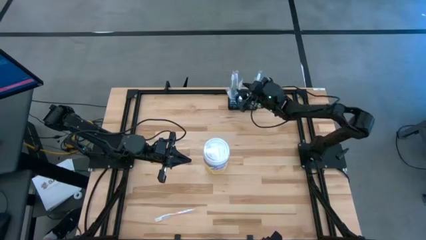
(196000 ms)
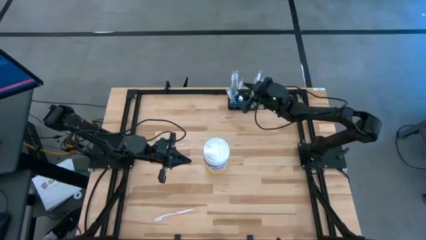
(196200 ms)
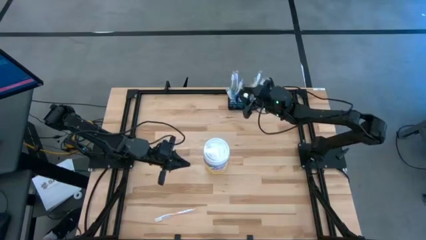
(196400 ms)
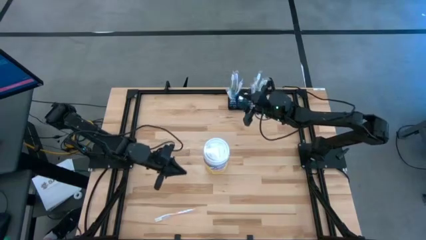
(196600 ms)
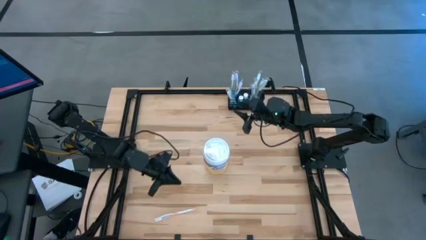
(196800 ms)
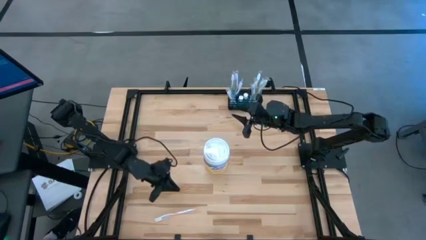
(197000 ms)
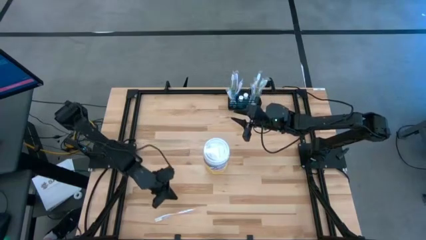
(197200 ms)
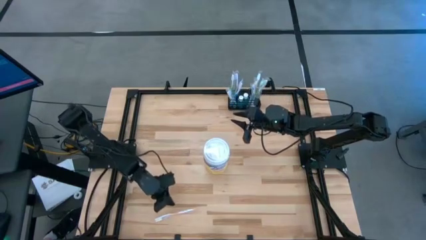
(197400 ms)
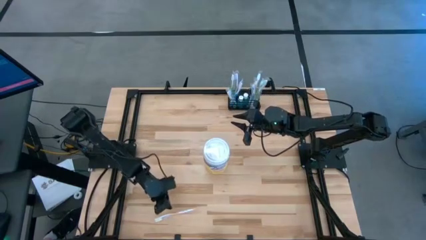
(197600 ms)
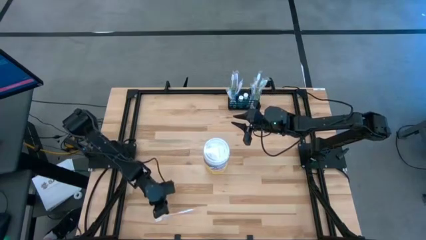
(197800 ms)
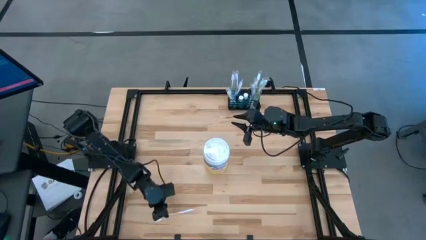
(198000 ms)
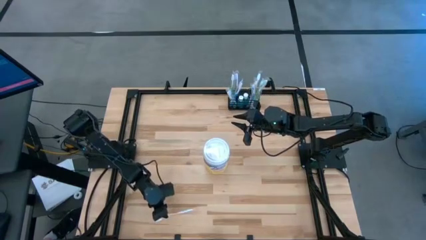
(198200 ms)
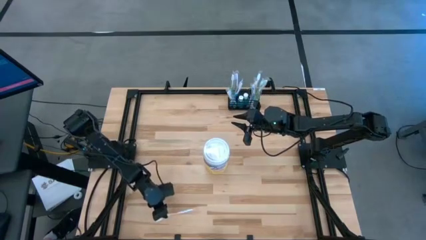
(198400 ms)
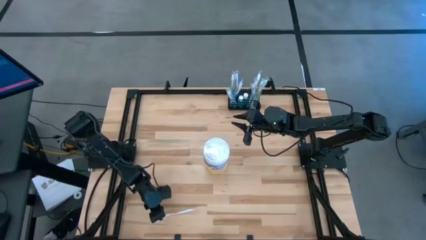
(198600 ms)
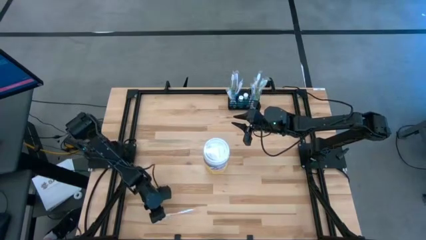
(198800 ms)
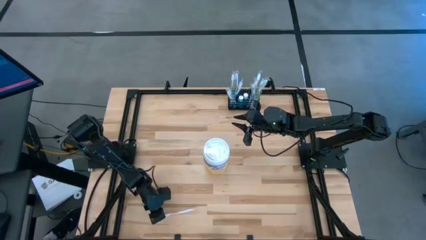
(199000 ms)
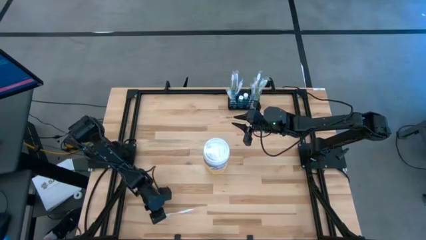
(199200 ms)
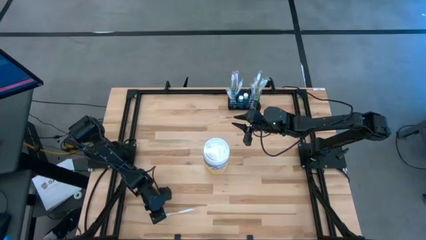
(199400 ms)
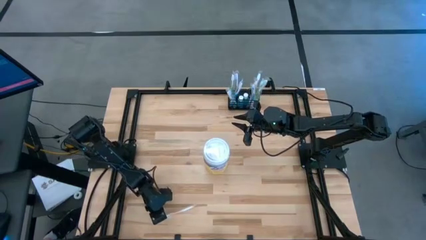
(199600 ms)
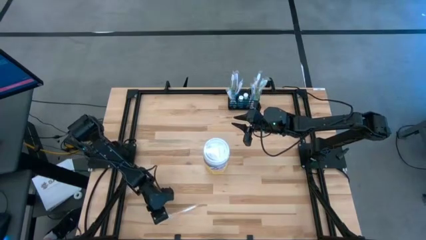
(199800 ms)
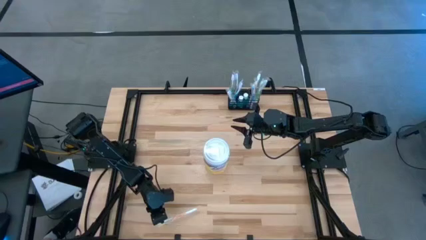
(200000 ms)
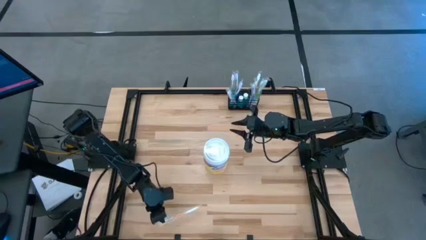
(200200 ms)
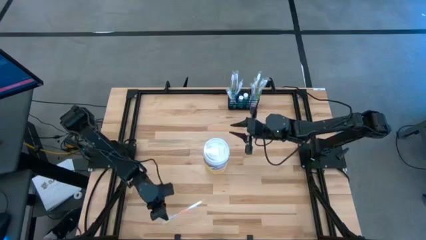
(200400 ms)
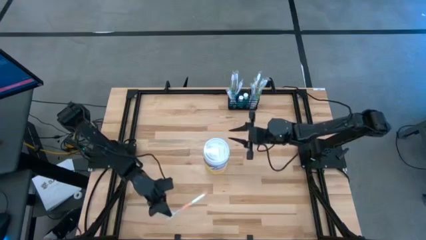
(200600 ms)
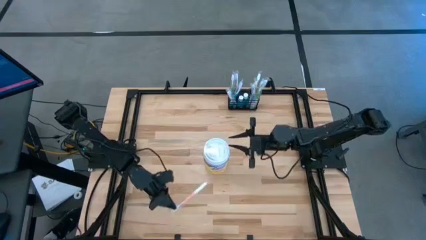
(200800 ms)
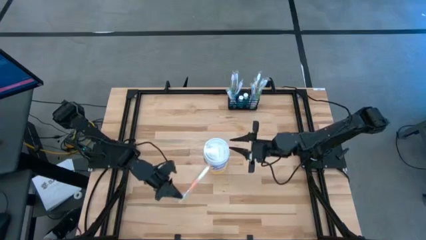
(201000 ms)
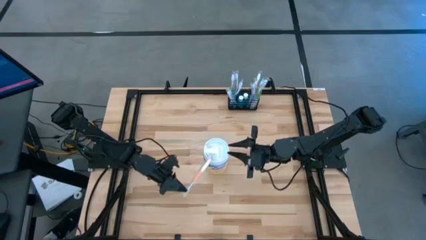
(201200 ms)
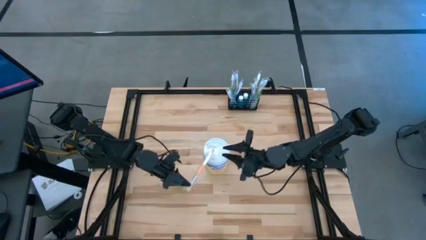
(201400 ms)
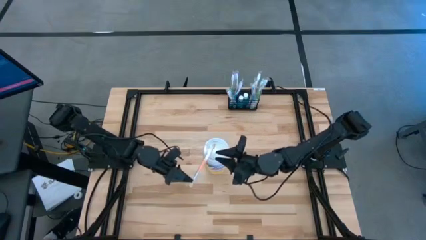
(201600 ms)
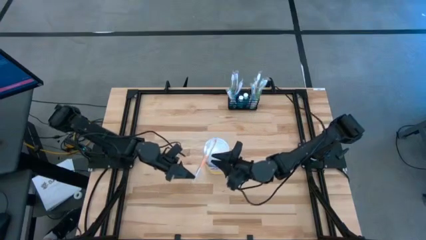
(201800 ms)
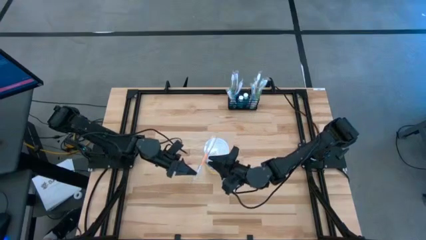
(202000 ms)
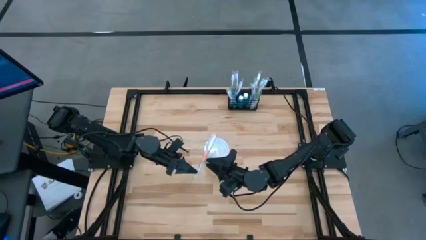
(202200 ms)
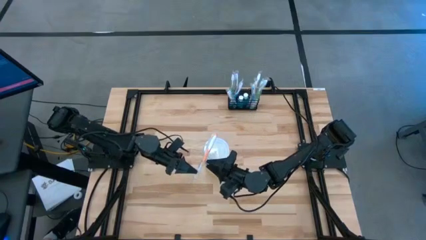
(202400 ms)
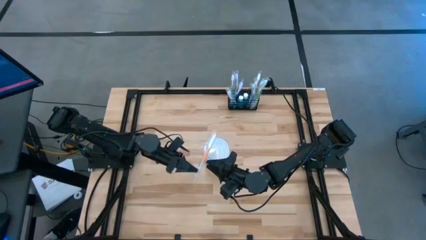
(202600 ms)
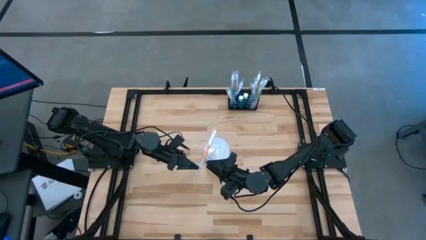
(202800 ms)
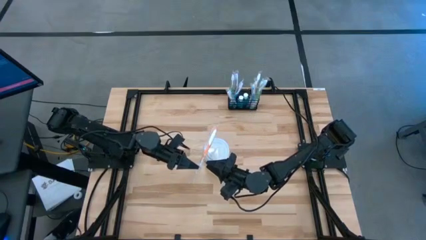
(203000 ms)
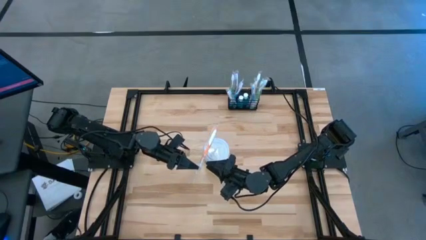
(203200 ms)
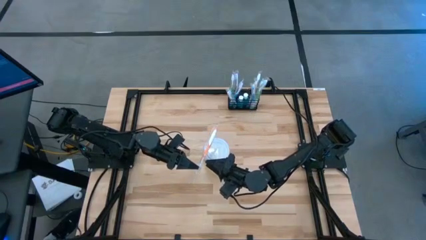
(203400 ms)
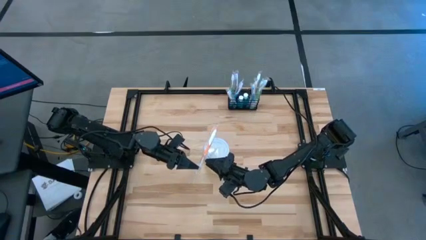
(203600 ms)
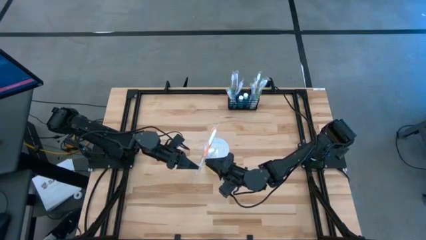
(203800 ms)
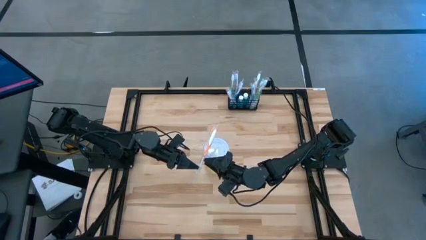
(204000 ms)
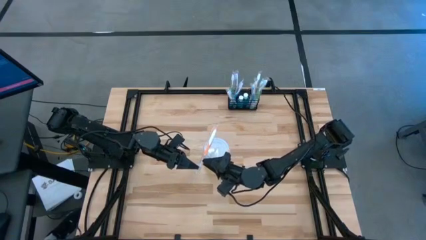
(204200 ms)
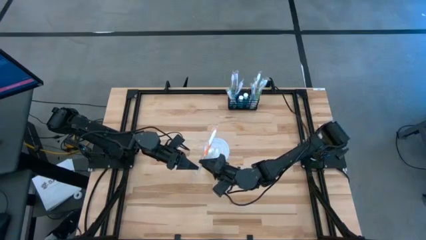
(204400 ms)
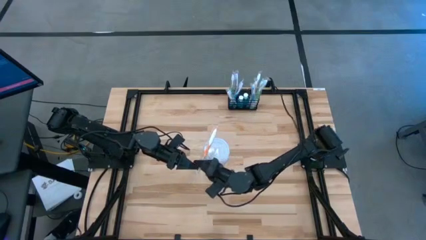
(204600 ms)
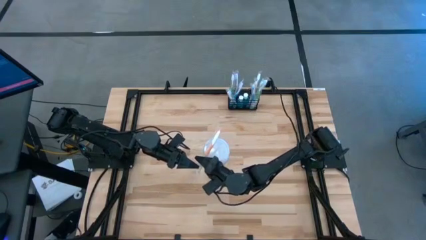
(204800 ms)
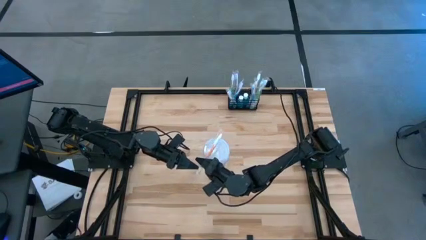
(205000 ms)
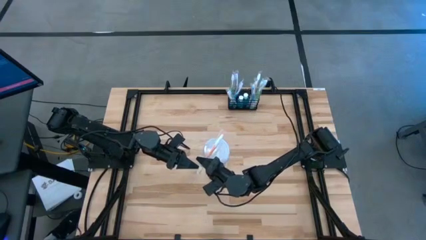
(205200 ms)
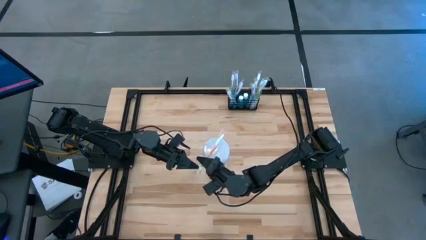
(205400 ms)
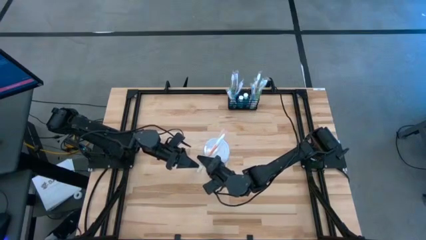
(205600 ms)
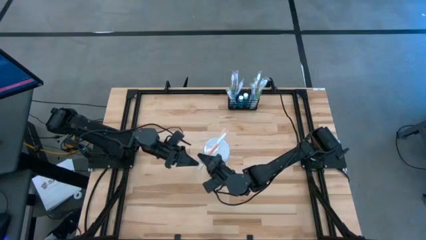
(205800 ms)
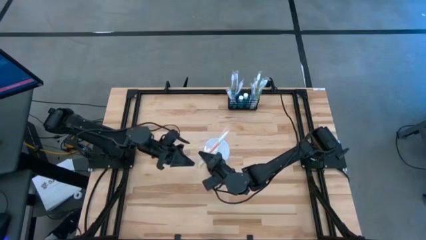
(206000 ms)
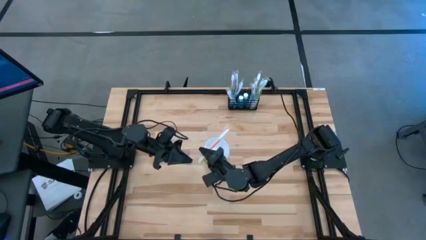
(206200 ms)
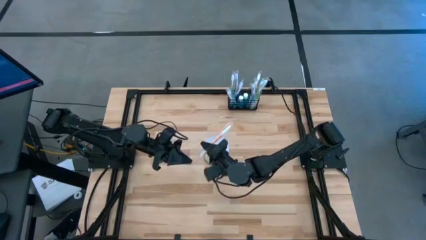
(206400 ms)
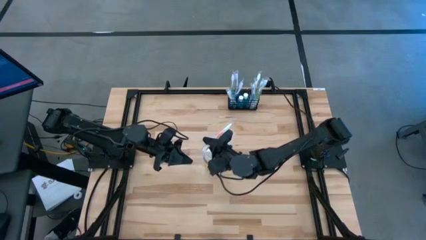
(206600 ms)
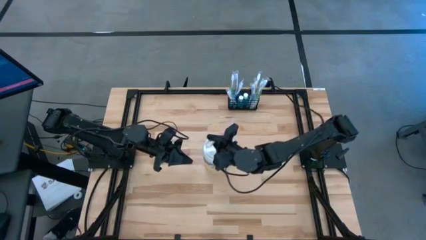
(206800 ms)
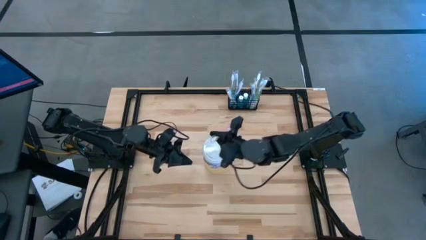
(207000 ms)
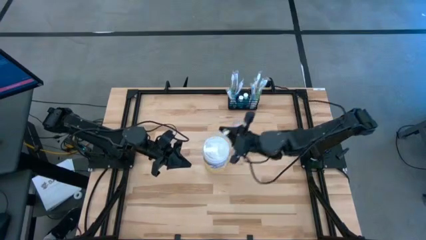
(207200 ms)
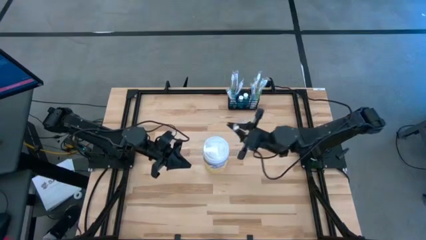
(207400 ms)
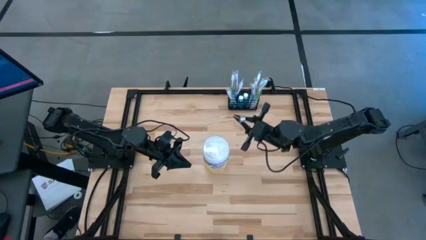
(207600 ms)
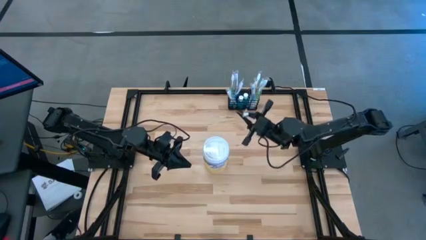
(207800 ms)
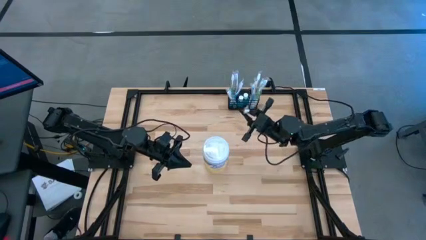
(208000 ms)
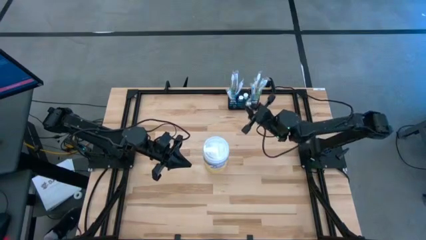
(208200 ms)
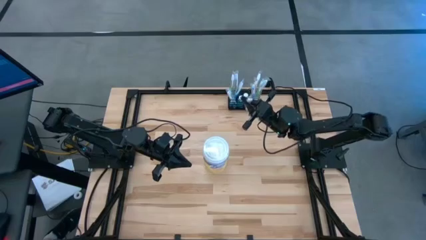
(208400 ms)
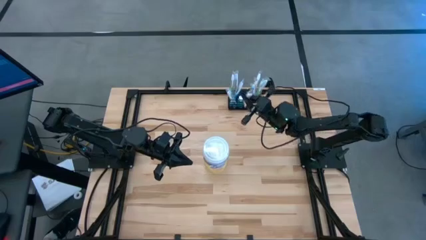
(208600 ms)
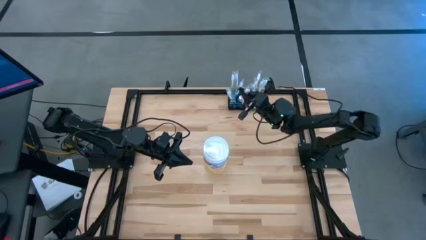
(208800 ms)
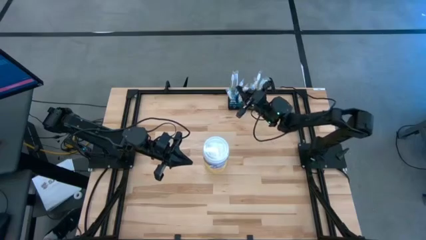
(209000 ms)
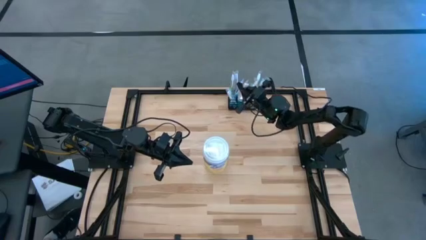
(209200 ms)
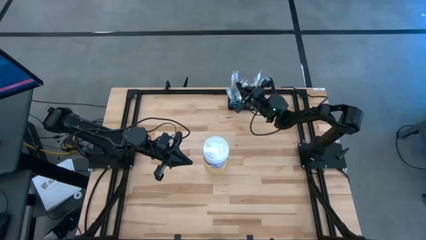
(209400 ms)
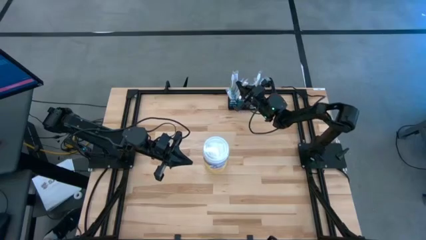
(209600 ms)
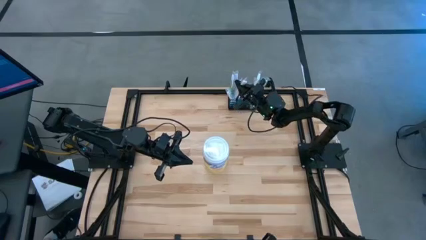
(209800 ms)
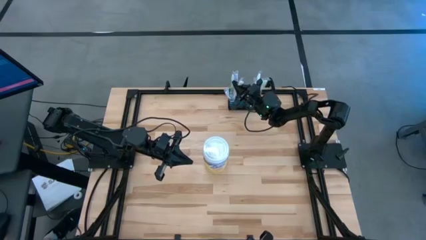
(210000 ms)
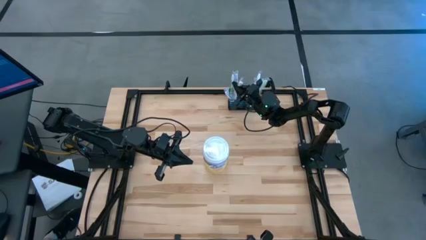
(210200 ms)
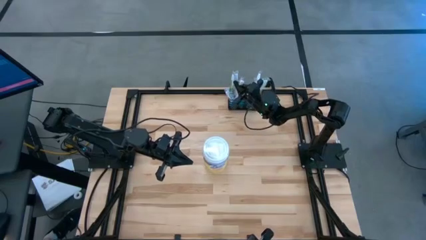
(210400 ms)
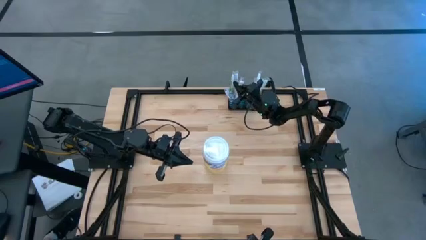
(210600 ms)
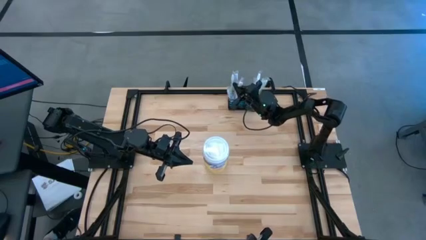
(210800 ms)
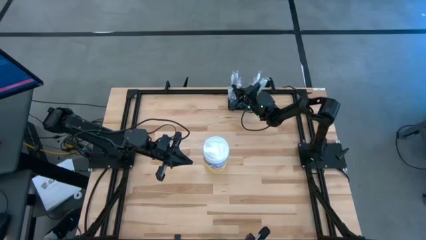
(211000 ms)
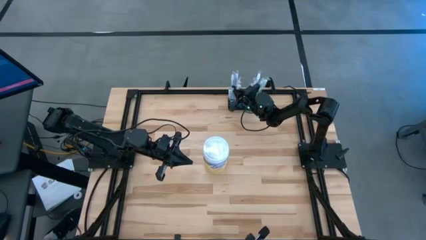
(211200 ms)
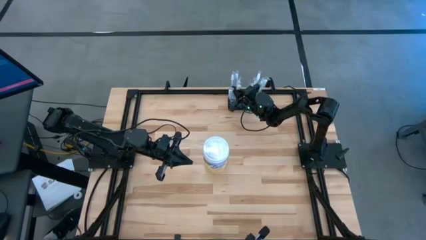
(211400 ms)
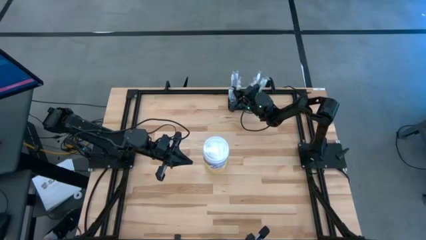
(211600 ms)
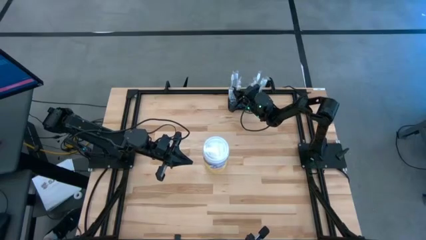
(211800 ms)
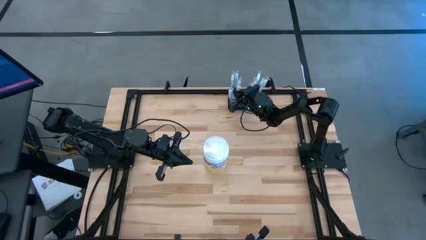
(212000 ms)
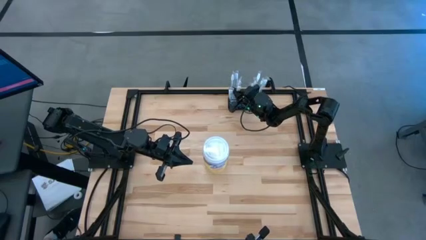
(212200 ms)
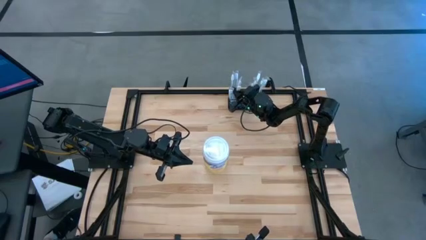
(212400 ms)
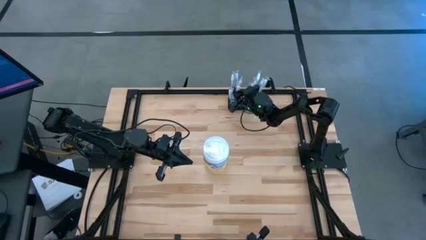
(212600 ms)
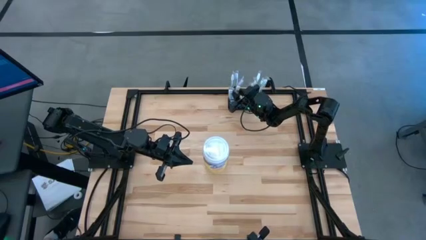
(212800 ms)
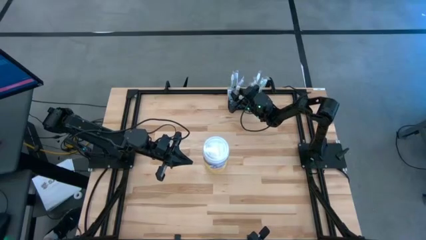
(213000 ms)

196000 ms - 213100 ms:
Task: Pick & Place toothbrushing station
Put the orange toothbrush into the black mesh organizer
